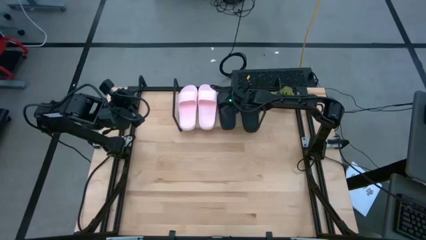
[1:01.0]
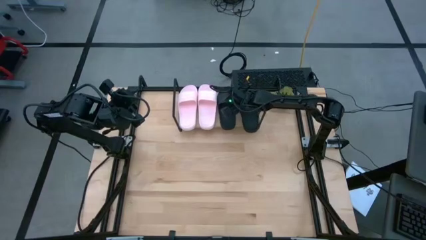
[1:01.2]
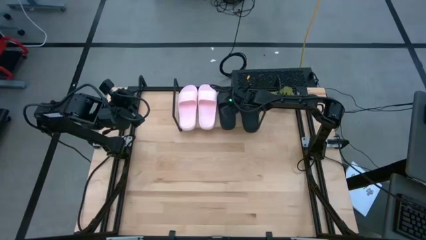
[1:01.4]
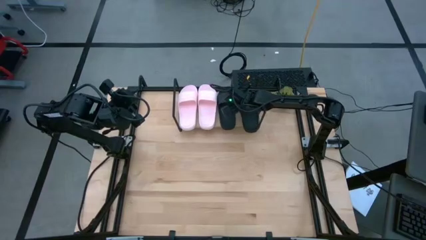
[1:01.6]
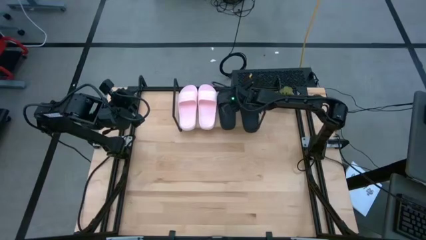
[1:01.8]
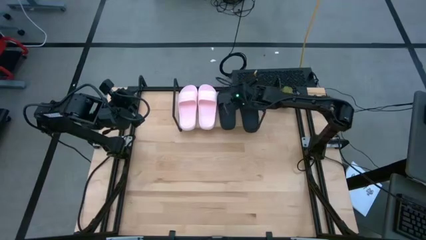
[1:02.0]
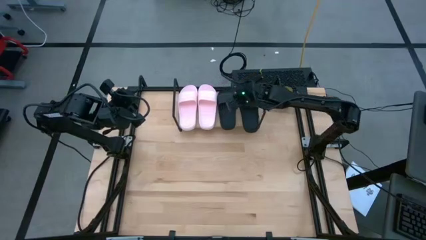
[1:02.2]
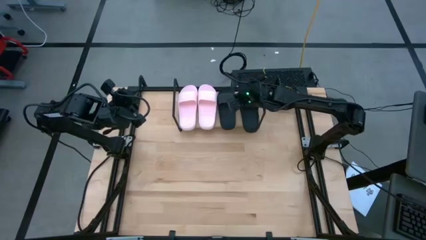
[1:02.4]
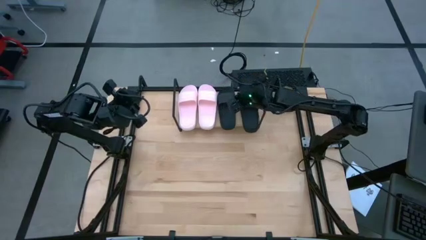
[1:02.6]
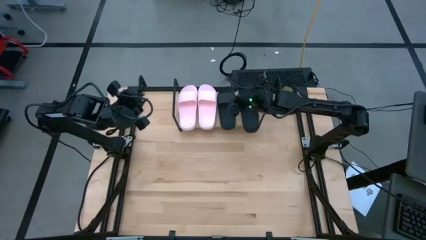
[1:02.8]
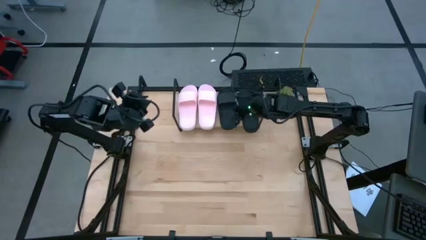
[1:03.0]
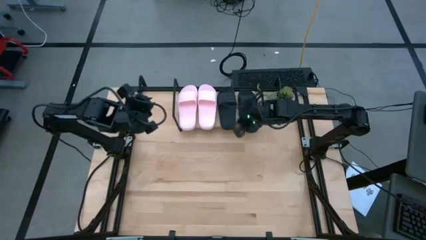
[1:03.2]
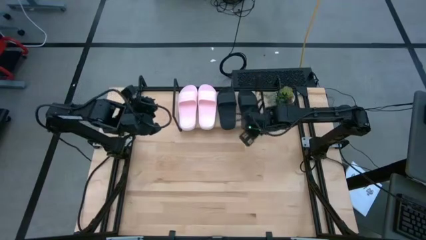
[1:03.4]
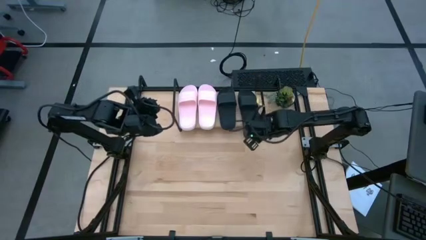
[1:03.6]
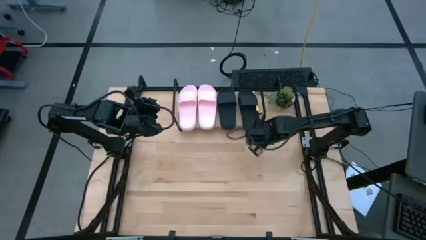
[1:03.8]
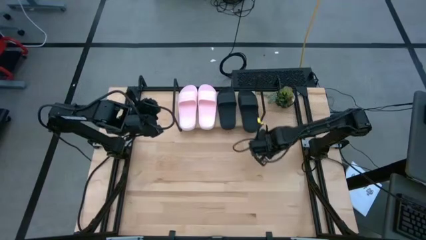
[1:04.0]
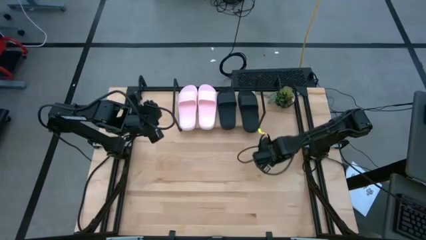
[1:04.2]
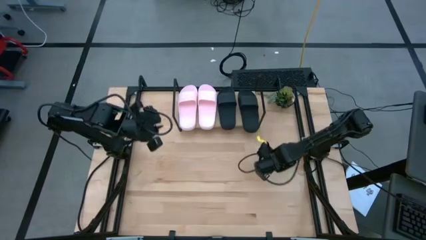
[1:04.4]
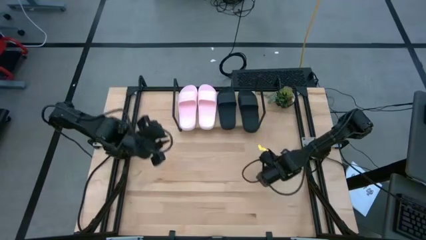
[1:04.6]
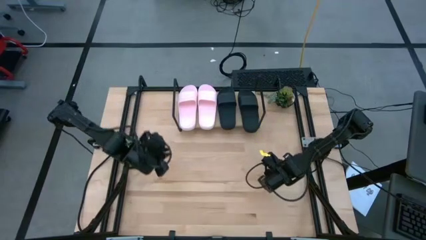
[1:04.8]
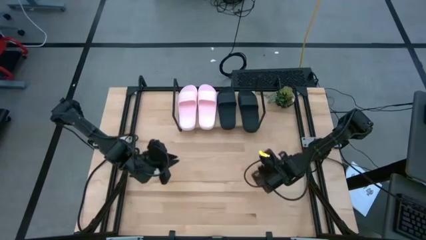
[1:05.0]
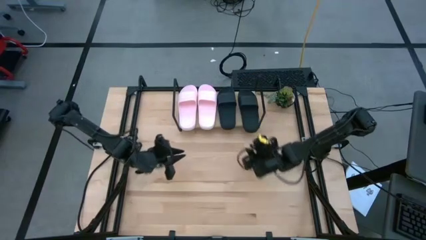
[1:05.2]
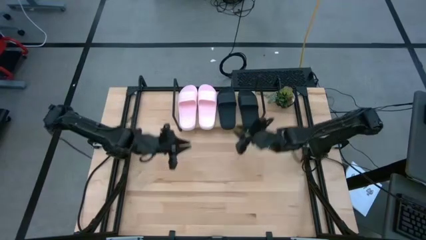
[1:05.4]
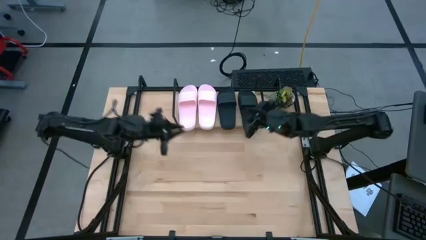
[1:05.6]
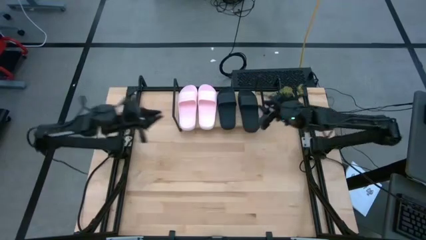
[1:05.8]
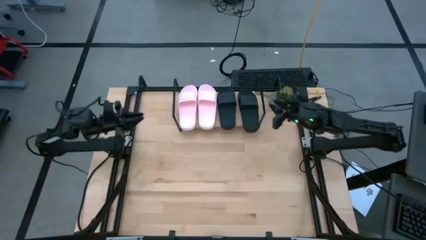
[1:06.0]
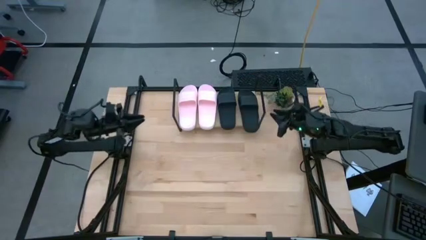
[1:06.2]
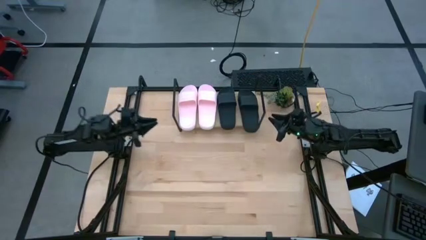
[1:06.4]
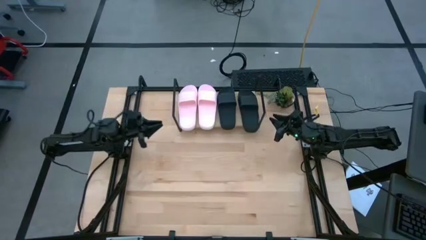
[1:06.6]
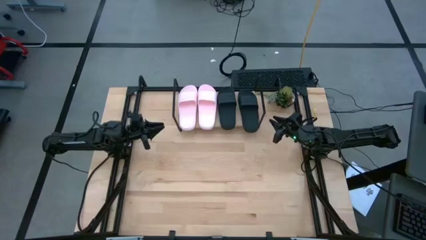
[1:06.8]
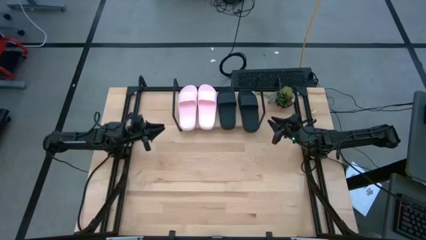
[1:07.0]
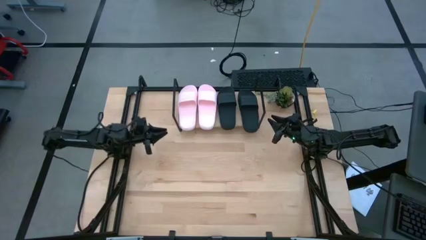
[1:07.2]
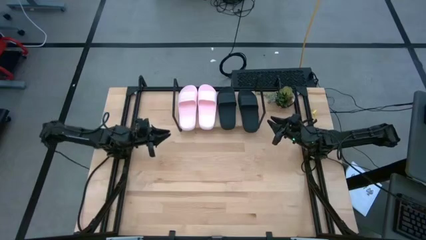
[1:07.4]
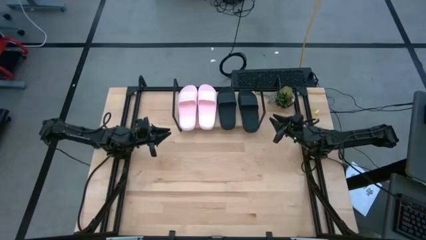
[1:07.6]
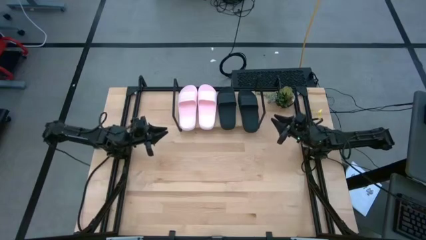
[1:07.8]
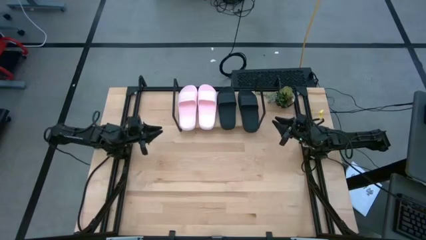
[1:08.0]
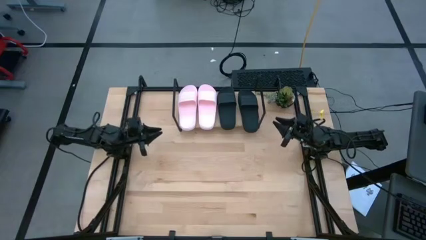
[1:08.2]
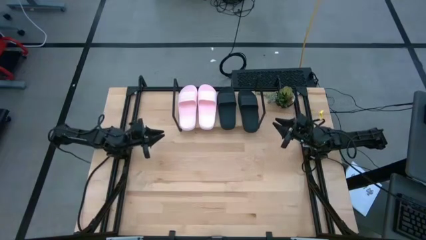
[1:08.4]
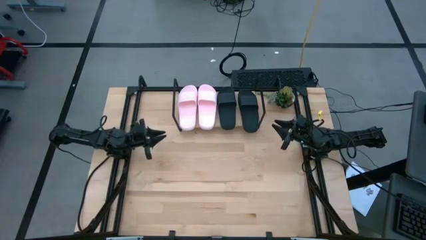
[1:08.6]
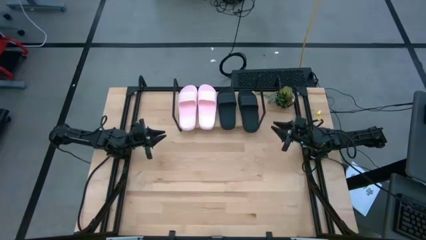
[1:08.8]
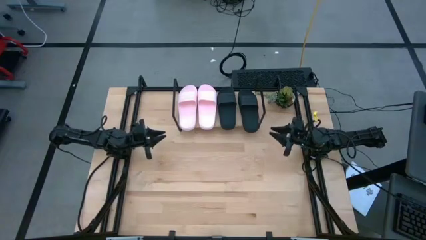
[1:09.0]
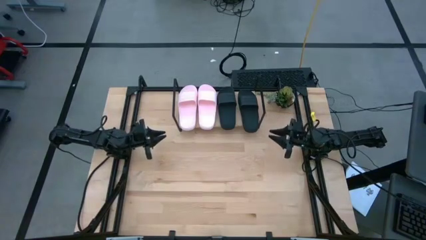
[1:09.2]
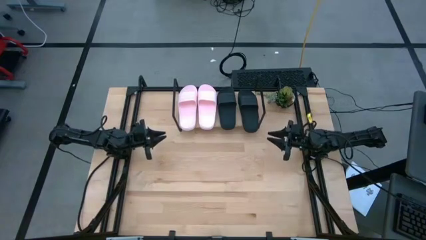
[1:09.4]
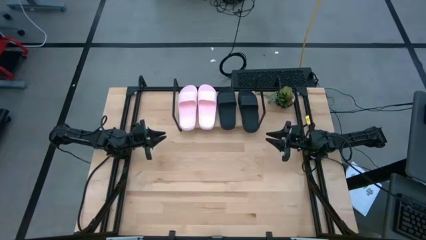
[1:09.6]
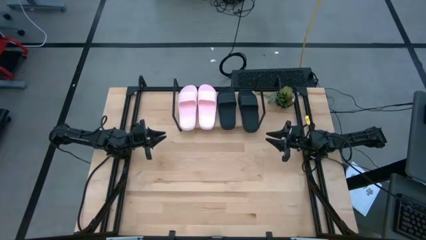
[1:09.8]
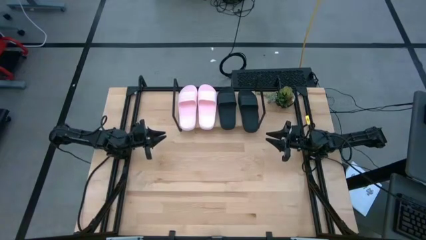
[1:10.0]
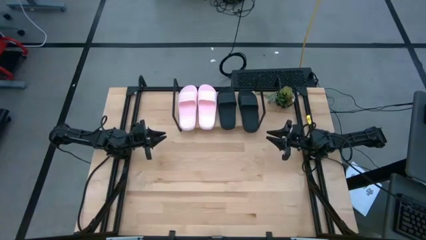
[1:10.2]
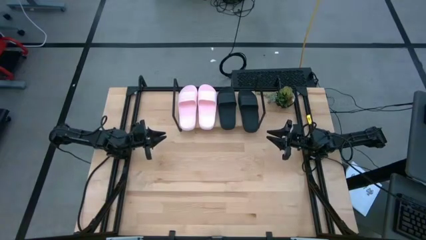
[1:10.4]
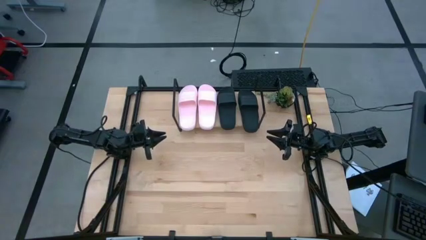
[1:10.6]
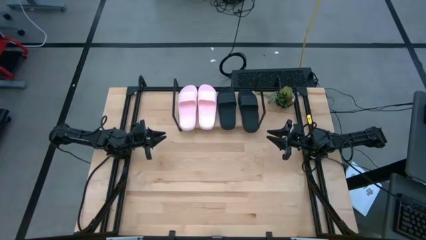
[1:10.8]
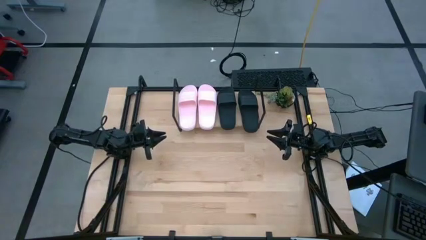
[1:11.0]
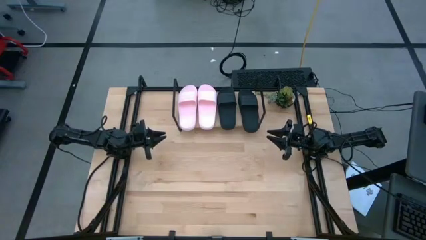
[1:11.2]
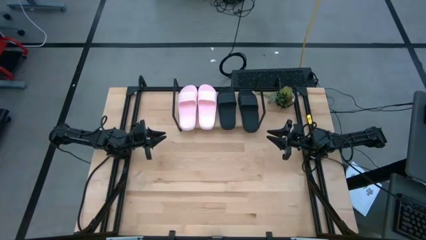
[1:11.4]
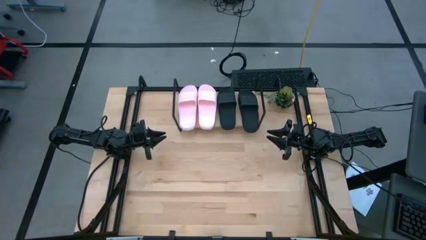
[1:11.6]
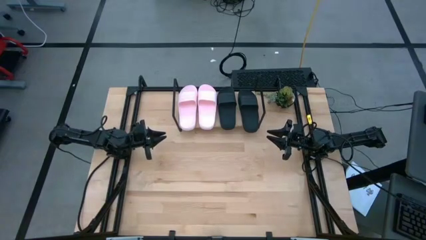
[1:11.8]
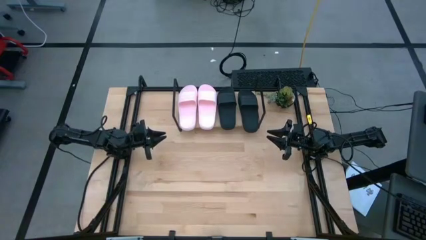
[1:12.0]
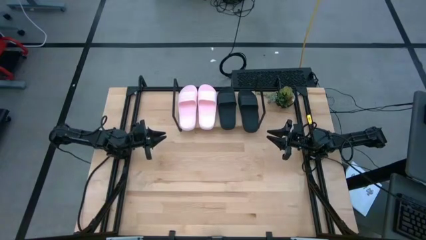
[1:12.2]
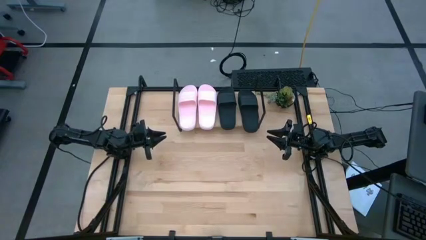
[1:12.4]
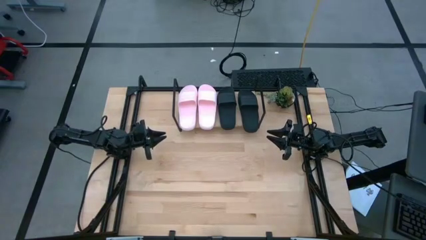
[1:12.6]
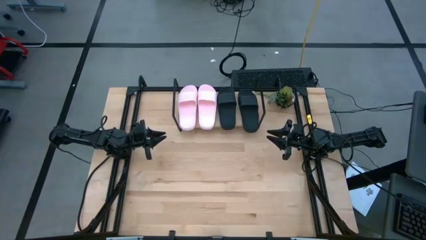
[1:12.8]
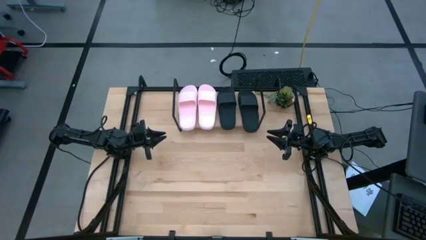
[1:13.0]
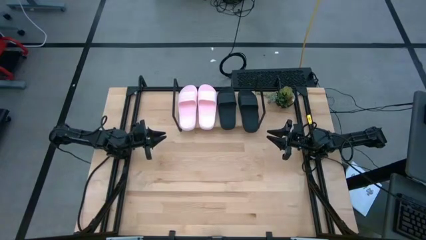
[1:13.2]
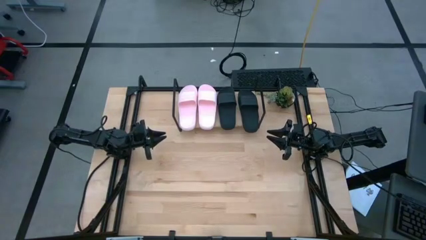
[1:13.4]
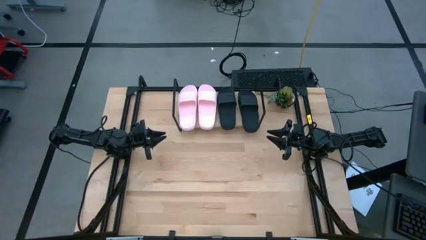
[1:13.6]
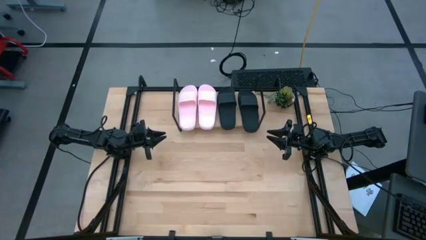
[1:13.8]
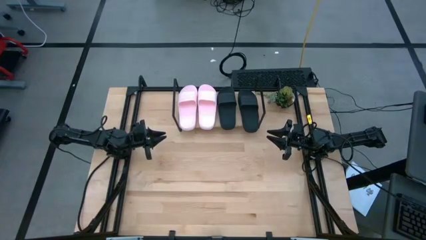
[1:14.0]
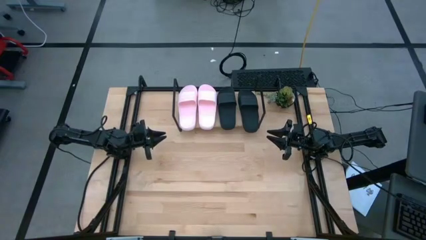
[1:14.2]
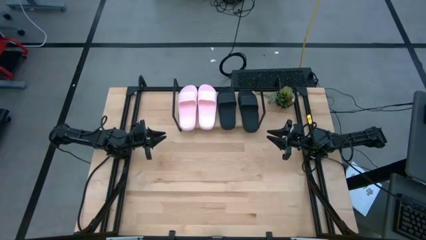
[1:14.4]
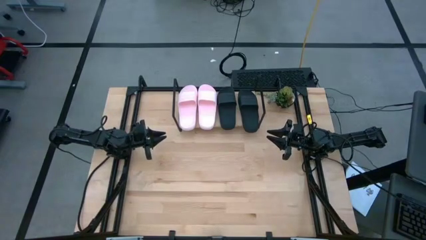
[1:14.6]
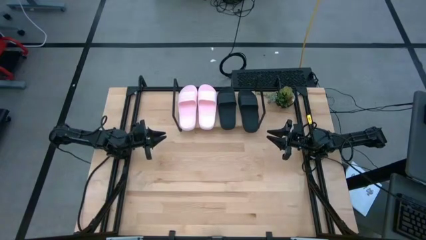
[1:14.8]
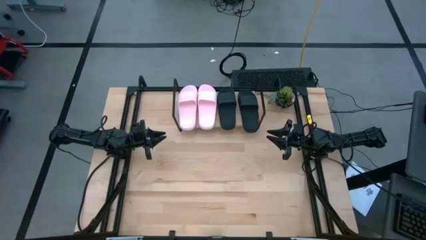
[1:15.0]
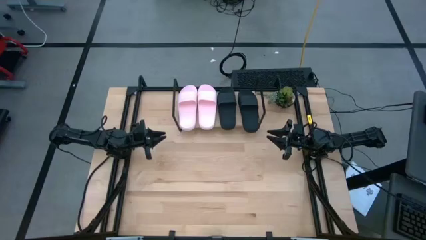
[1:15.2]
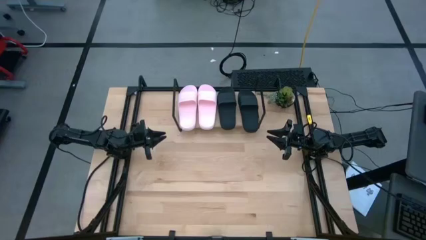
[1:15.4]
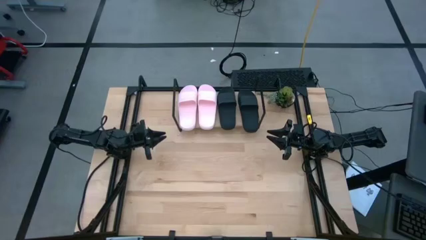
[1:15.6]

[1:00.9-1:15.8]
Task: Pick and place slides into the shelf
Return to Home Position
